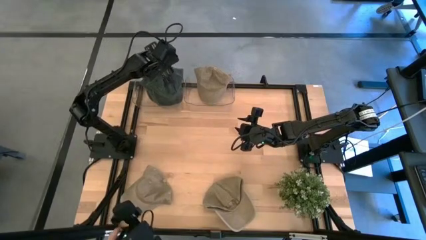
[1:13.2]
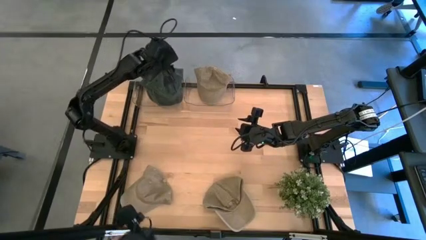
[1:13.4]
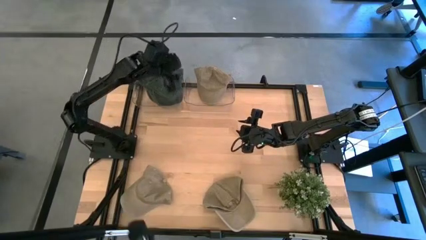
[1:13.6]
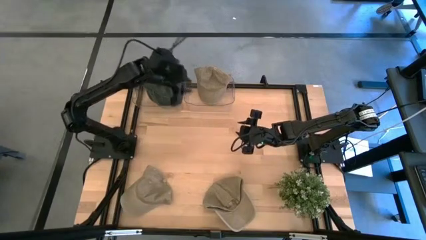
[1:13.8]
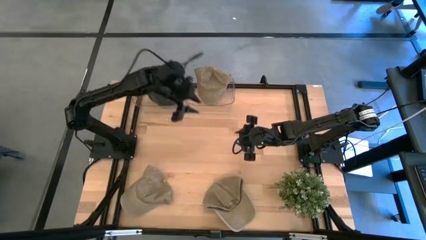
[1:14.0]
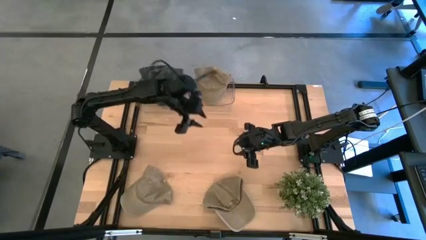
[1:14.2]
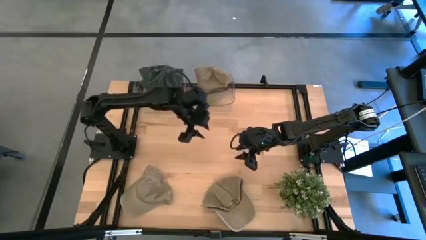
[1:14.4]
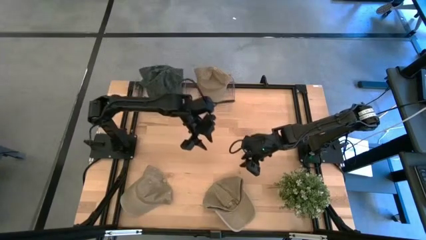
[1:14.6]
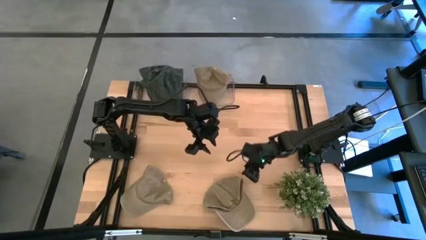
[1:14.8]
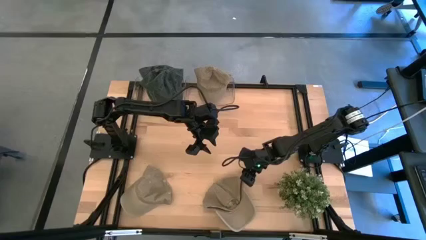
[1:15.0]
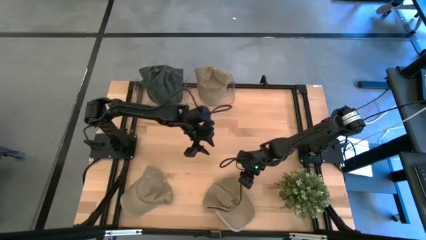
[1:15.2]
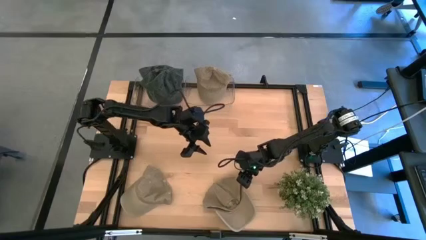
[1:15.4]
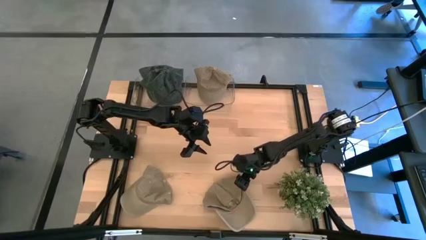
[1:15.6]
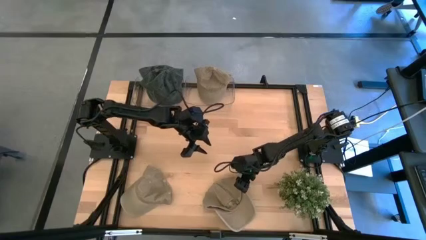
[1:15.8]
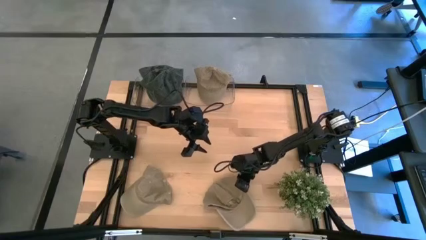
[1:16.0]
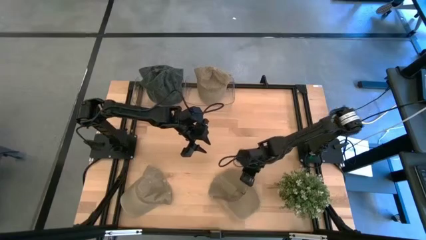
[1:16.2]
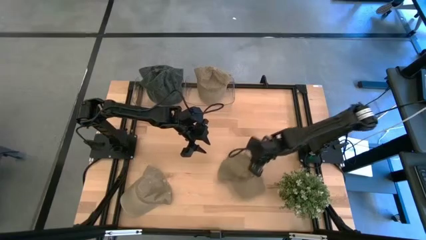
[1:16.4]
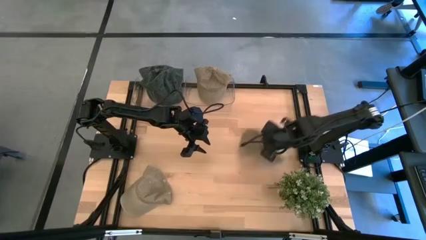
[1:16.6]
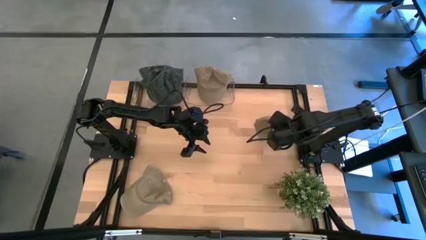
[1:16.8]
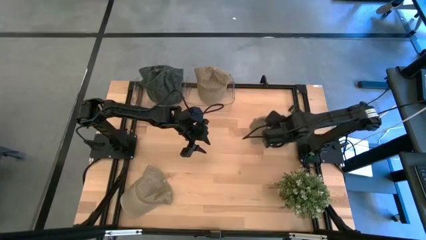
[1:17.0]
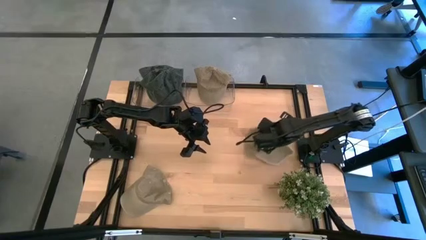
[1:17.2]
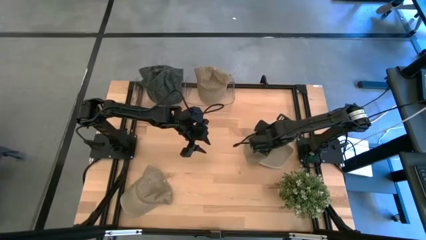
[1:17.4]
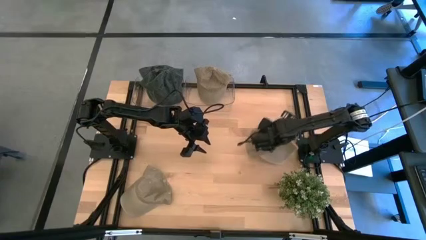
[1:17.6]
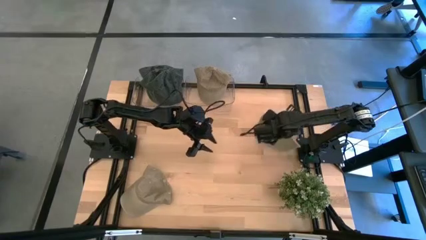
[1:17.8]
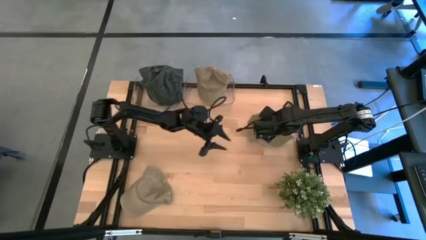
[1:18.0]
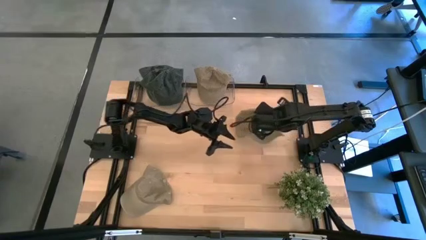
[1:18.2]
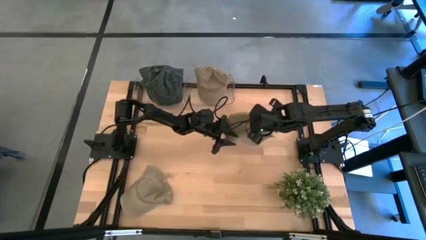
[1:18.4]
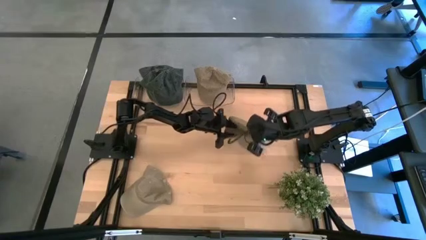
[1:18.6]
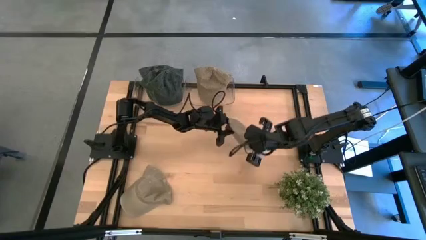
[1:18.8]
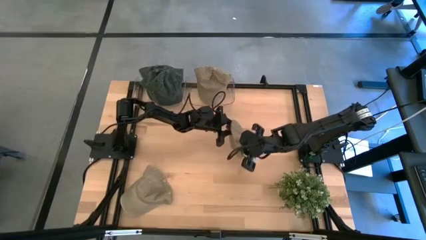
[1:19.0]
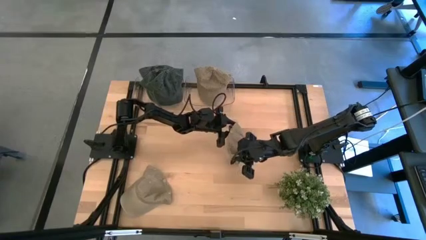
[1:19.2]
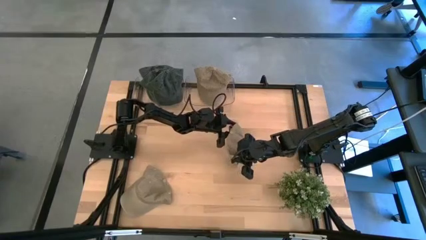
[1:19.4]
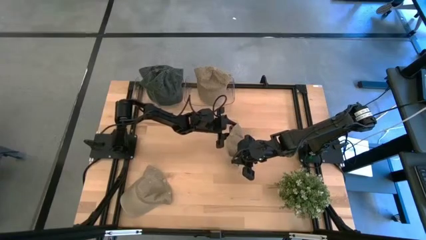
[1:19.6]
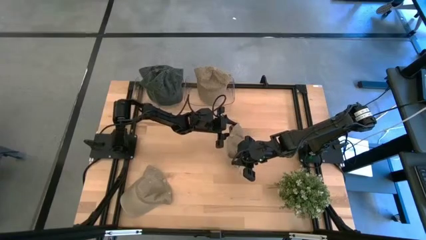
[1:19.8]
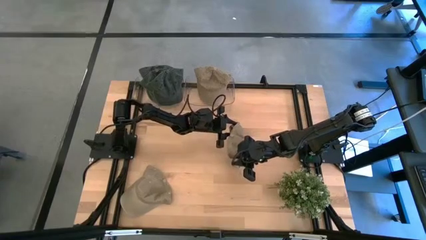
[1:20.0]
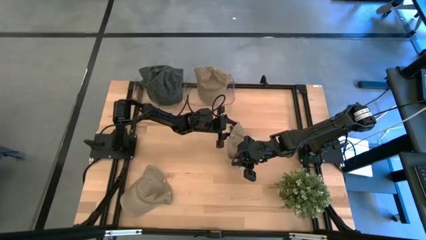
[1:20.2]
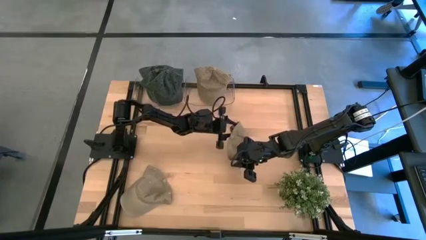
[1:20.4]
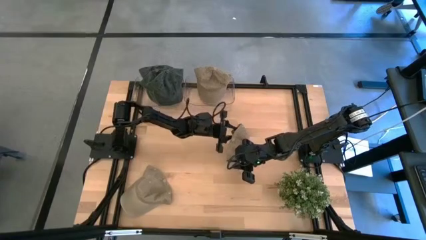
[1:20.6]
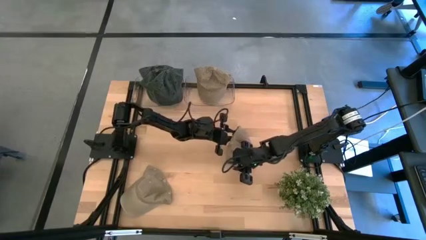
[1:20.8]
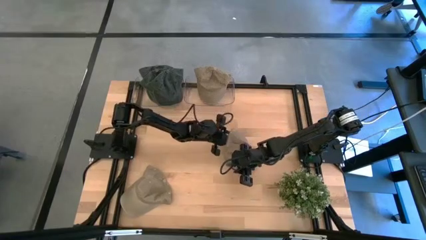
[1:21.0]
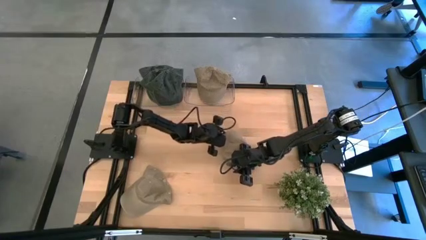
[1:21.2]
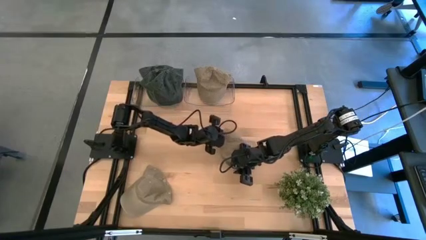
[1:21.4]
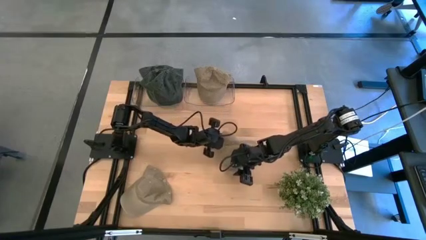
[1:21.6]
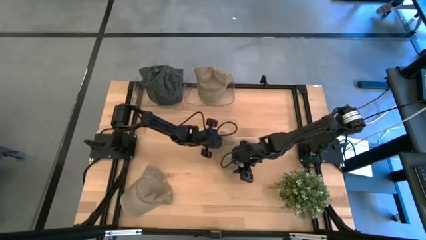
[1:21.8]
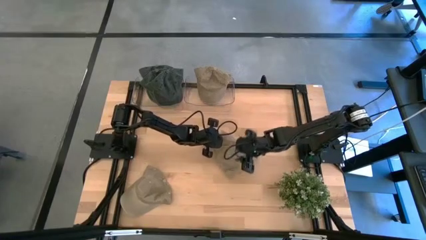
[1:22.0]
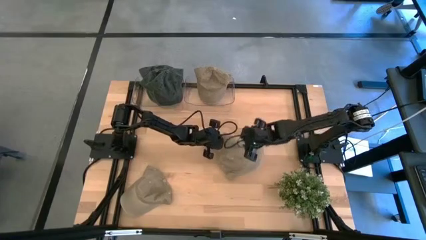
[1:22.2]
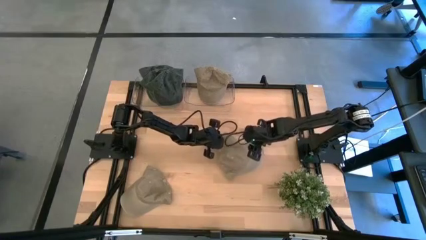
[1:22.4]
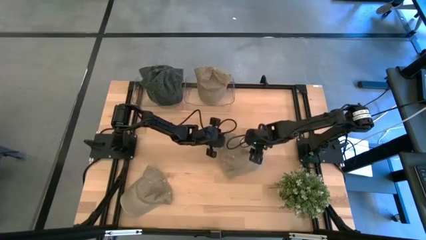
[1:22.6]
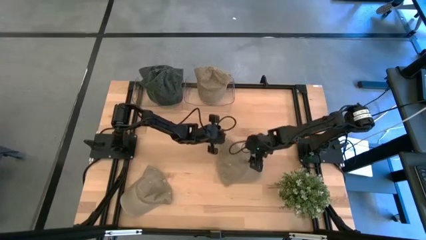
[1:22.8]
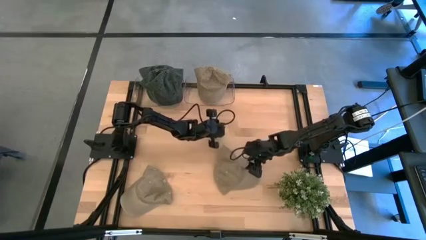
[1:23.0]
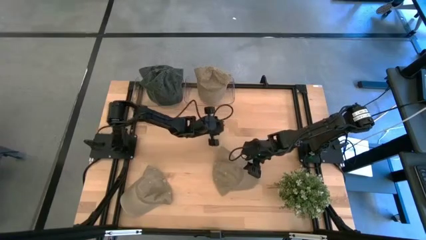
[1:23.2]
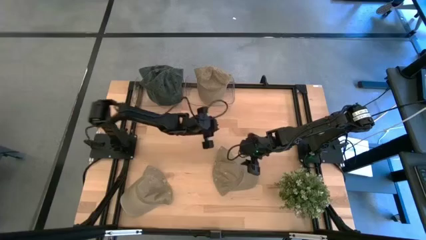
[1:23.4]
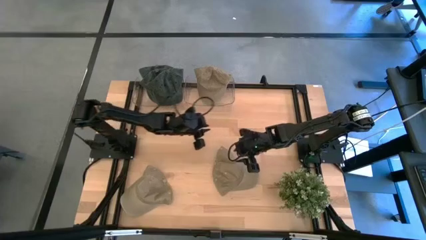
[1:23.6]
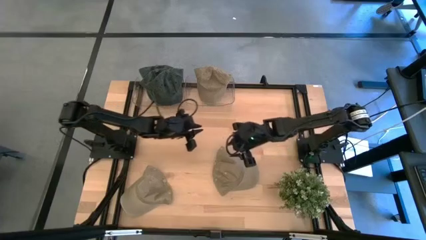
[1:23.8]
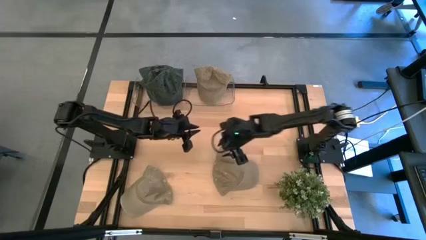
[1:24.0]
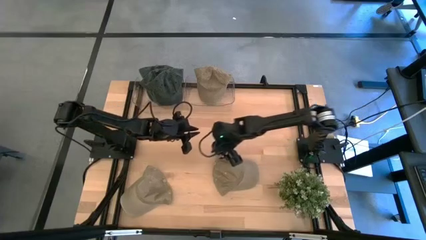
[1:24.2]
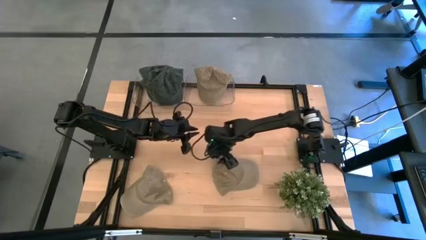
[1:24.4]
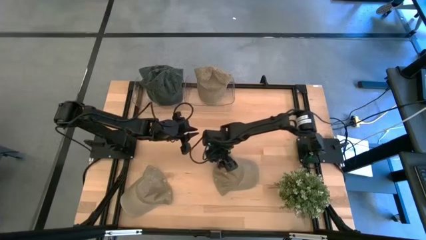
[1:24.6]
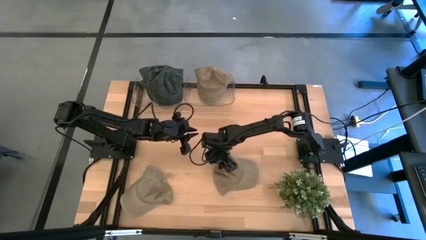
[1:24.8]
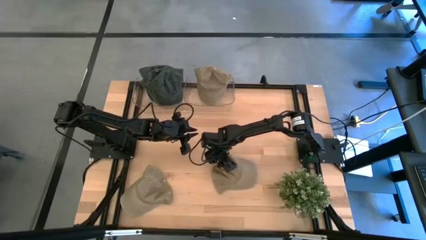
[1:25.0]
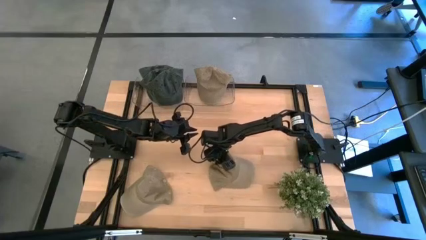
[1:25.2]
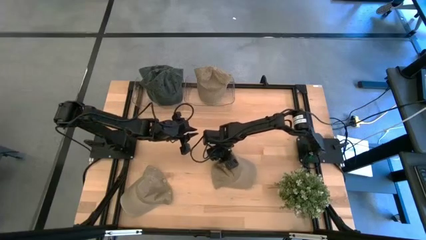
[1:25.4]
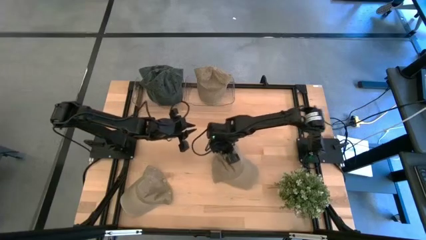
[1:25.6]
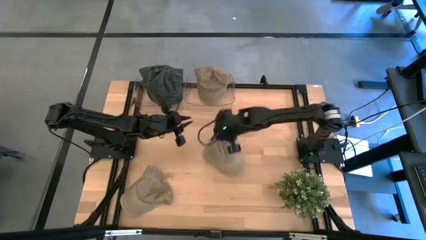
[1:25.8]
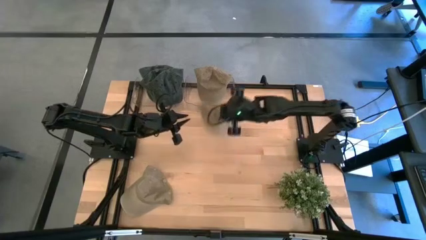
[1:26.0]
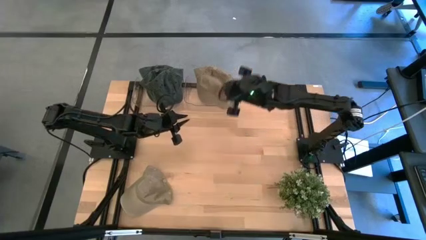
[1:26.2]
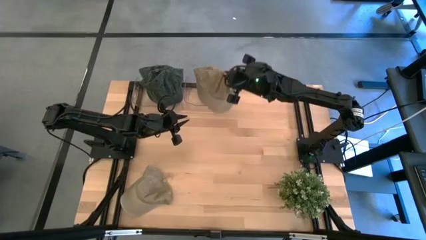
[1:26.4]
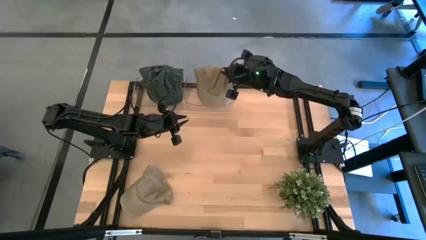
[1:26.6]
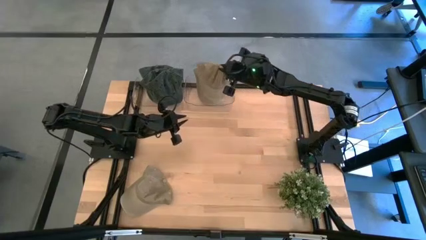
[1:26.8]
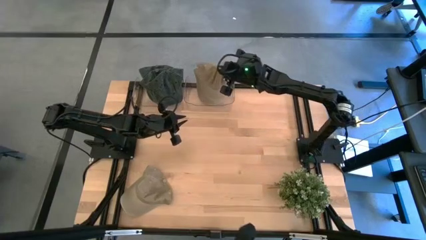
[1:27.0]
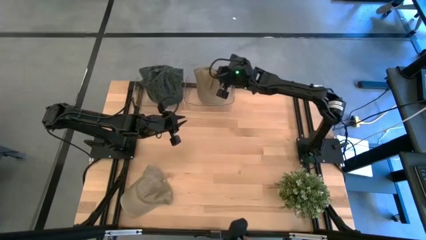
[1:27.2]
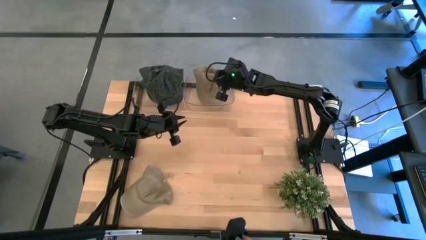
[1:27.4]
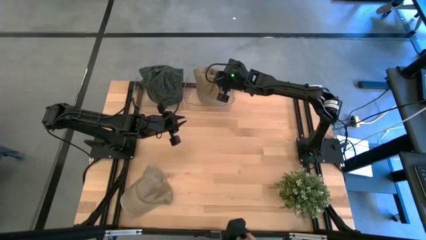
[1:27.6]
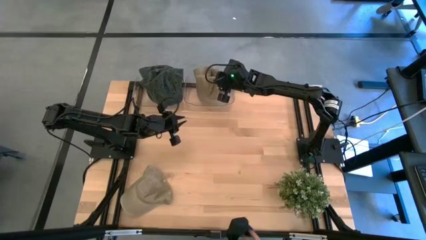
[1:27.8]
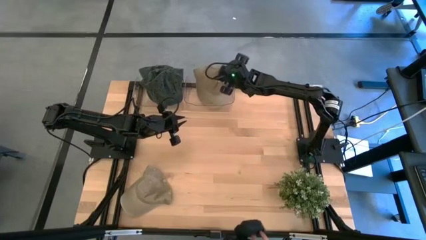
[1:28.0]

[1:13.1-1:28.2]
Task: Pick & Place hat
Put the right brown cap into the right transparent bin
